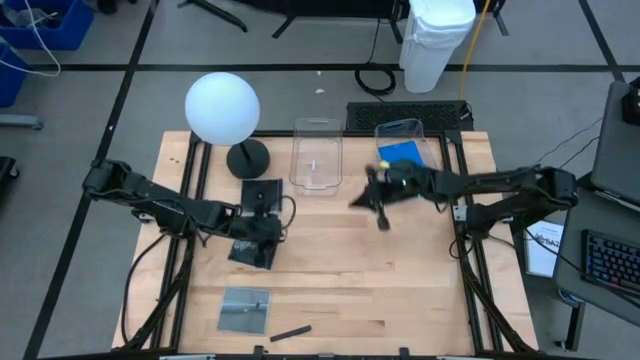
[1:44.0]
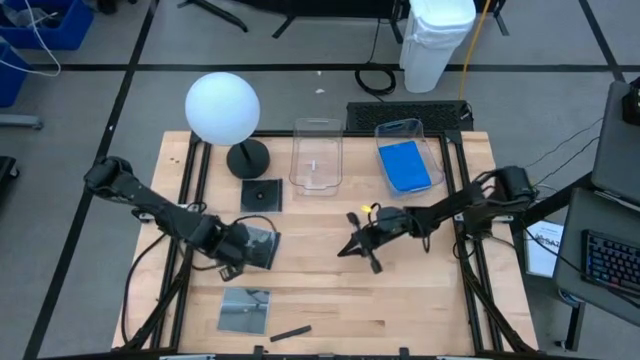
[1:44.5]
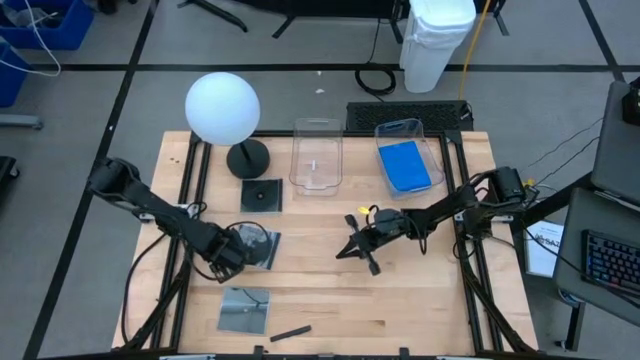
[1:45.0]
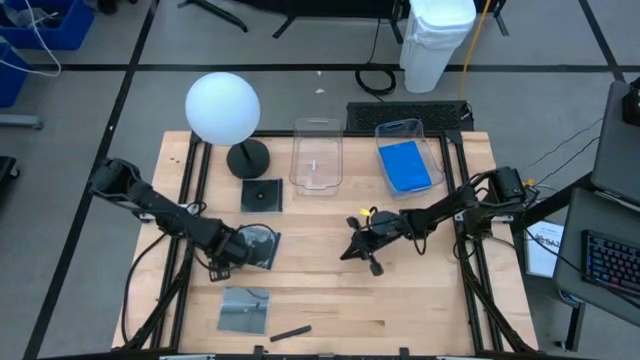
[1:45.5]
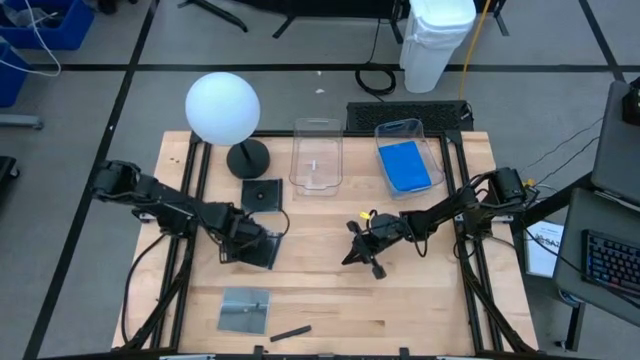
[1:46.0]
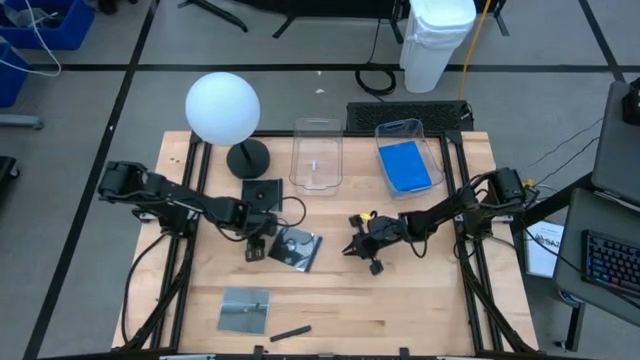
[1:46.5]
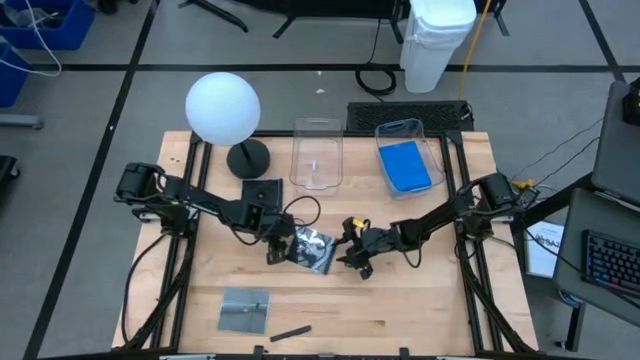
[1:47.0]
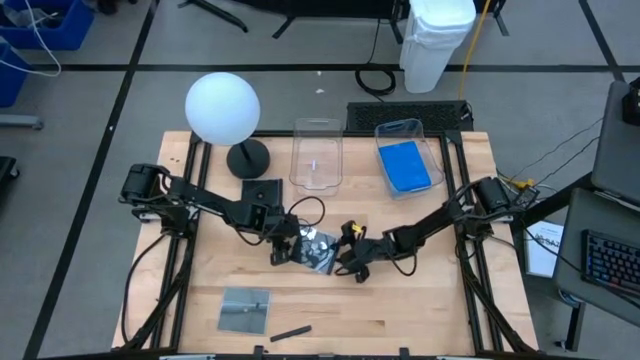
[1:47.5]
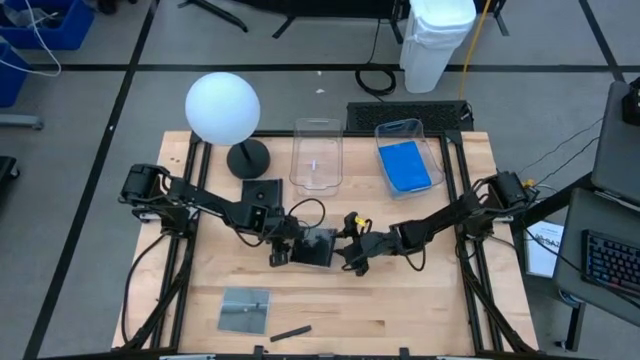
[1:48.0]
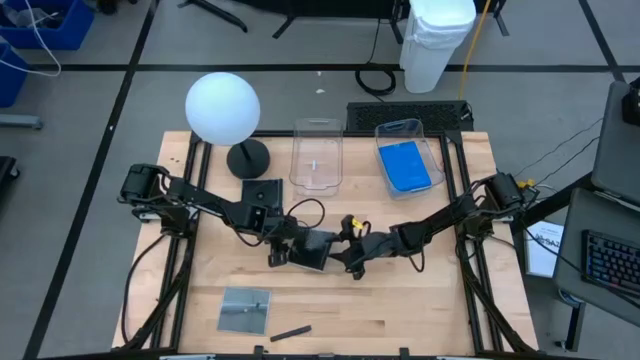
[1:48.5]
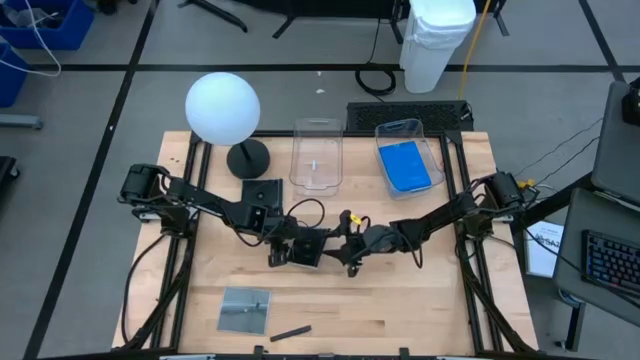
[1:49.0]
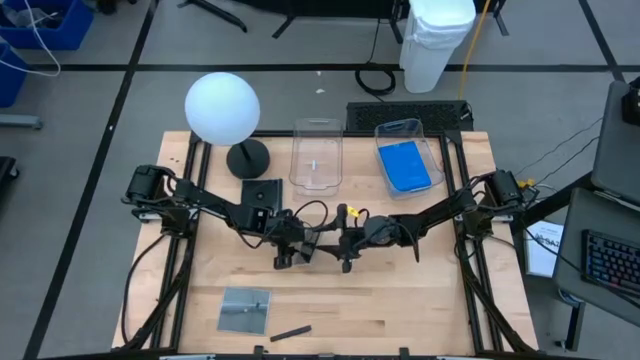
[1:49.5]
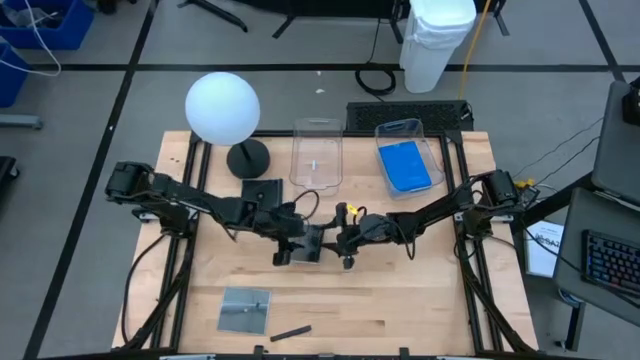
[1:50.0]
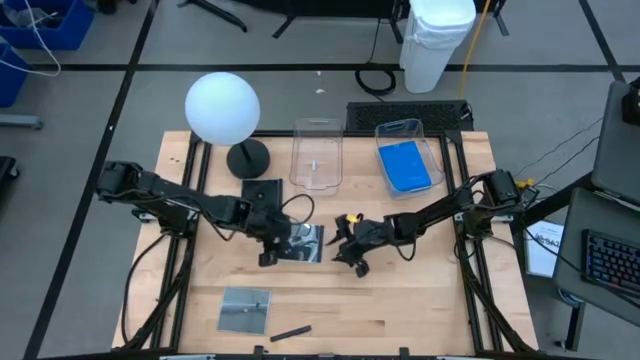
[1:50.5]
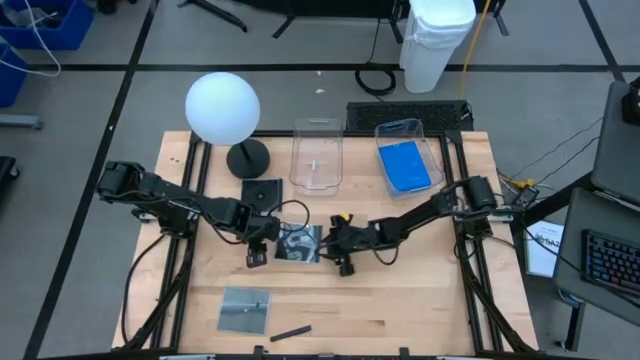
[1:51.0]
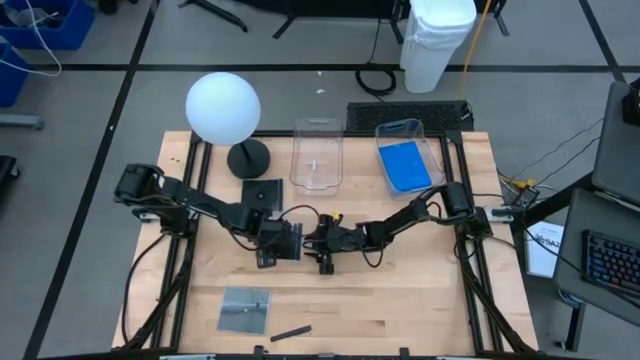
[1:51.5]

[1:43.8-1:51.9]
Task: Pick & place jewel cases by type
Put the middle black CD case into the left transparent bin

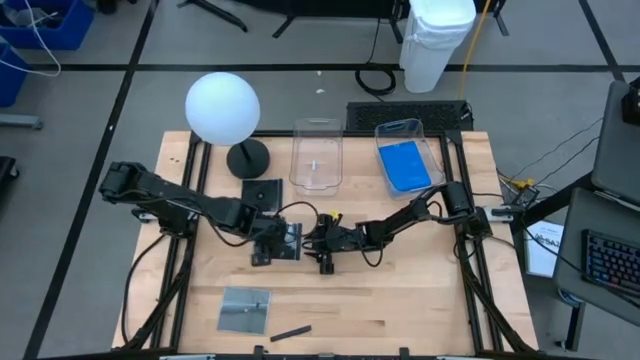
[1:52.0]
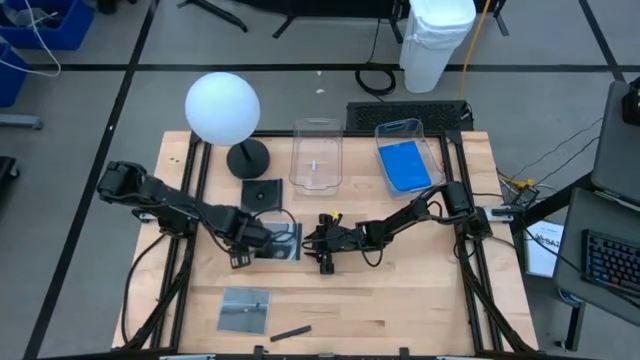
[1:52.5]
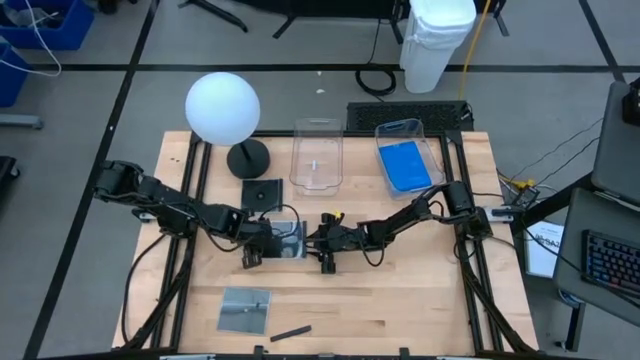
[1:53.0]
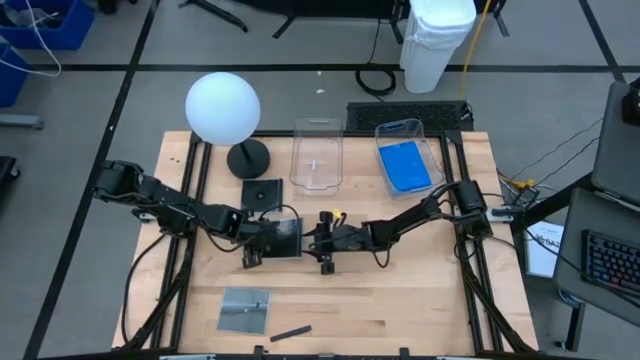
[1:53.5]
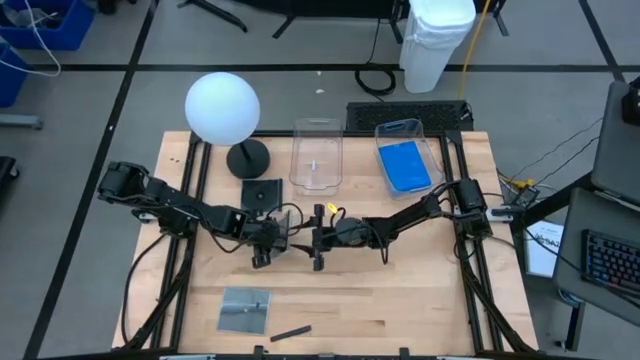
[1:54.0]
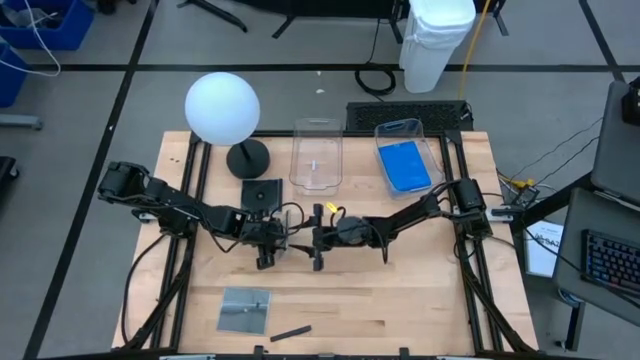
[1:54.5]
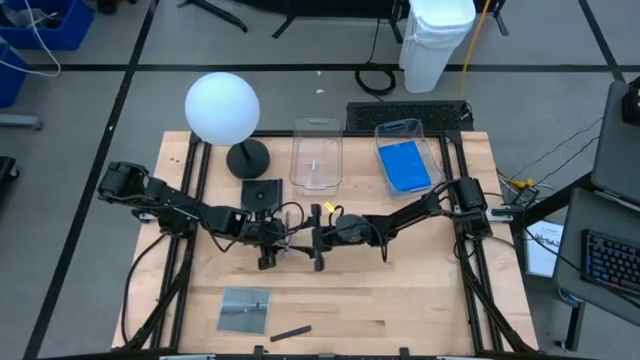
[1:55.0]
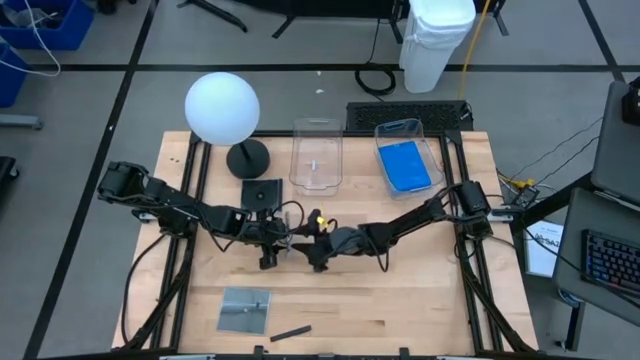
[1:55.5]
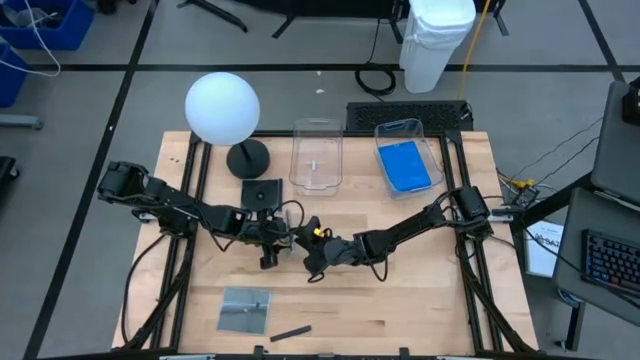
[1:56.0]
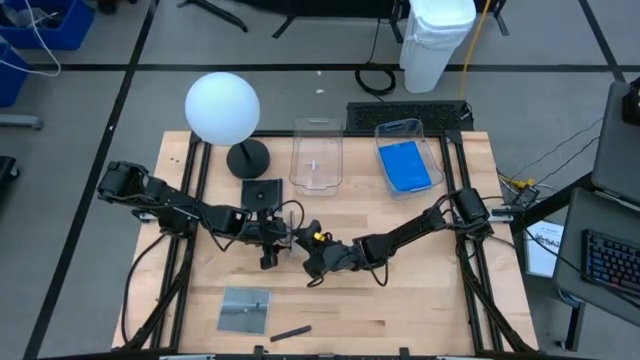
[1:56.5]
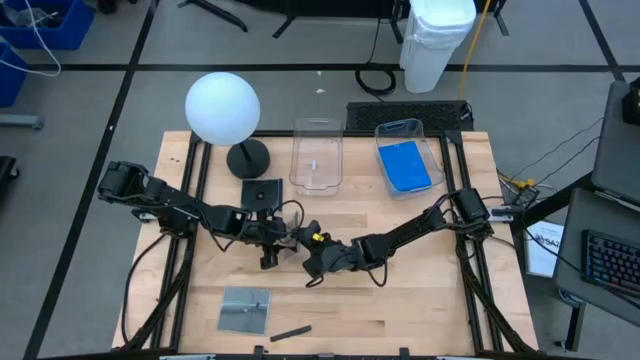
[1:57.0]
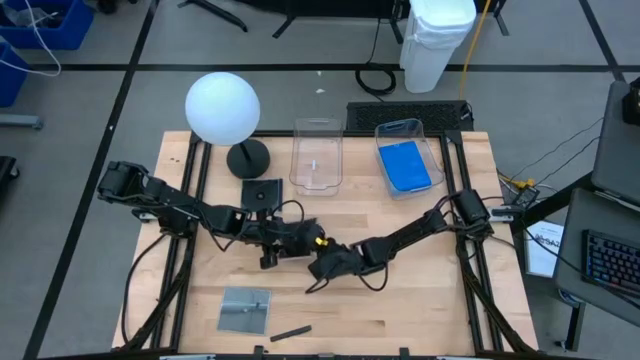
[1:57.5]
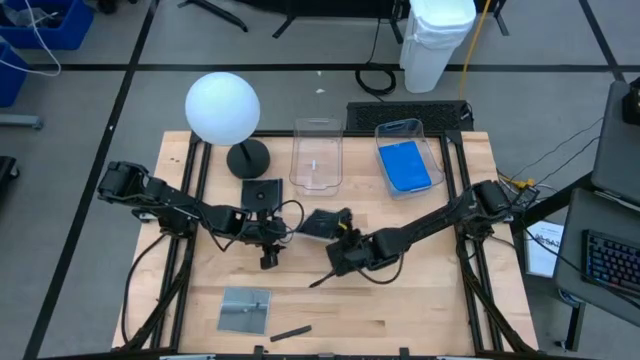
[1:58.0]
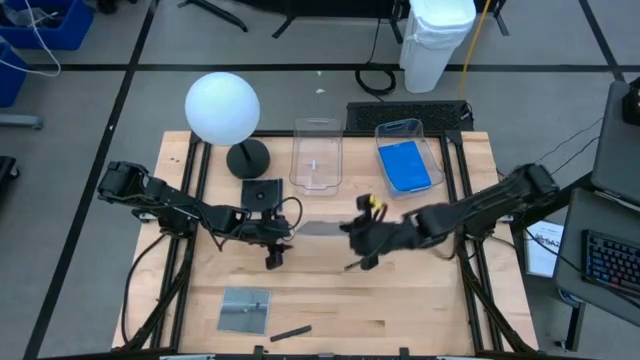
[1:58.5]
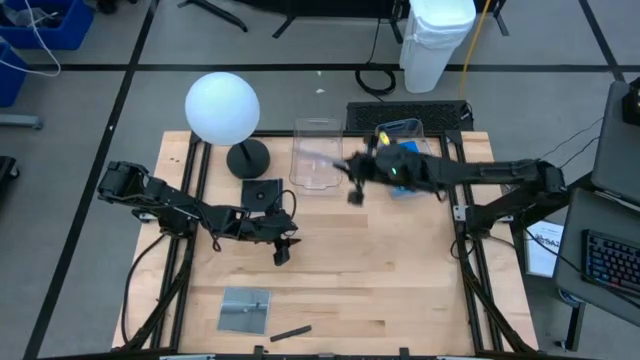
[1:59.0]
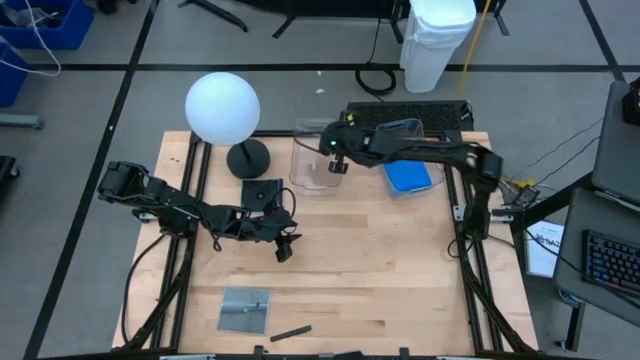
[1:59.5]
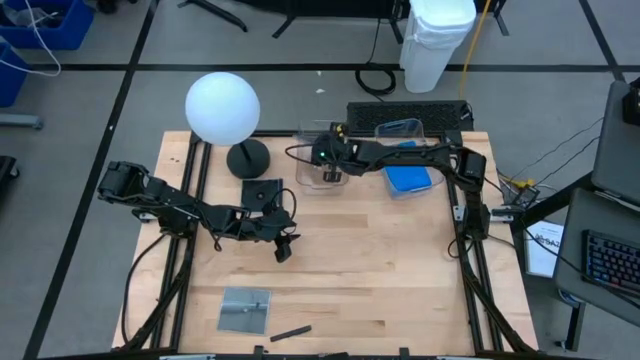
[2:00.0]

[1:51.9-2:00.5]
Put the middle black CD case into the left transparent bin

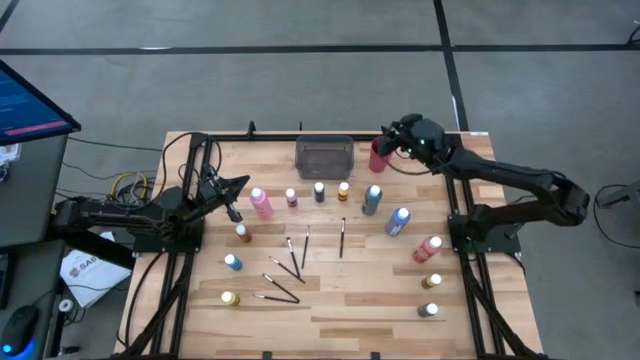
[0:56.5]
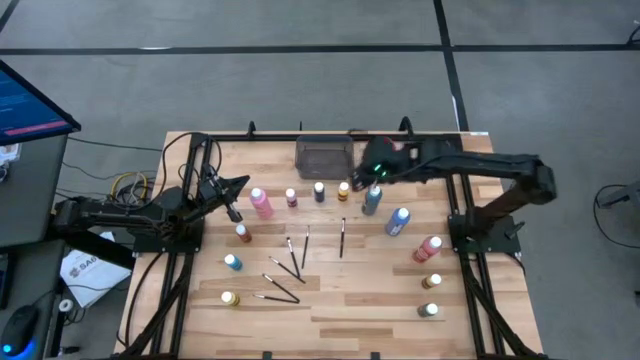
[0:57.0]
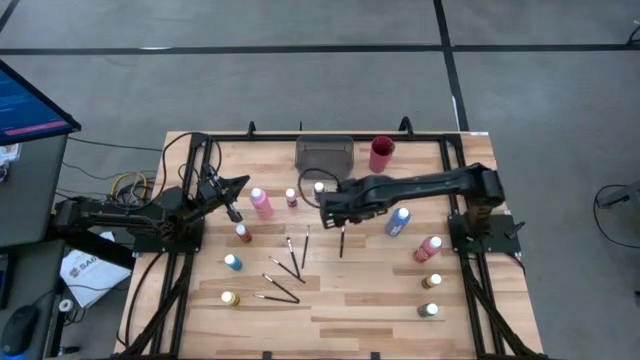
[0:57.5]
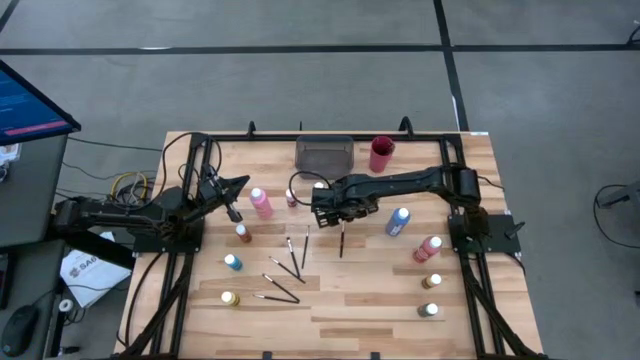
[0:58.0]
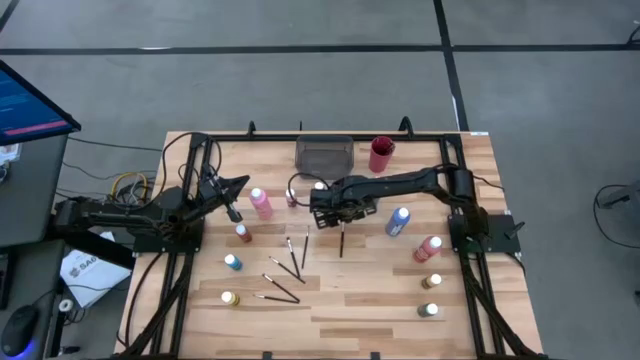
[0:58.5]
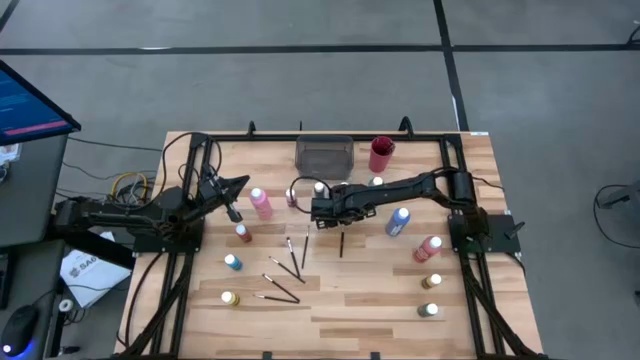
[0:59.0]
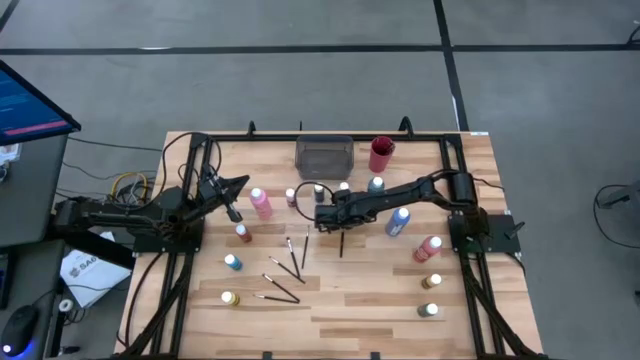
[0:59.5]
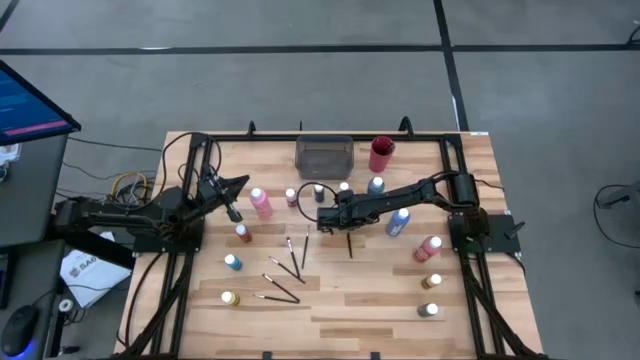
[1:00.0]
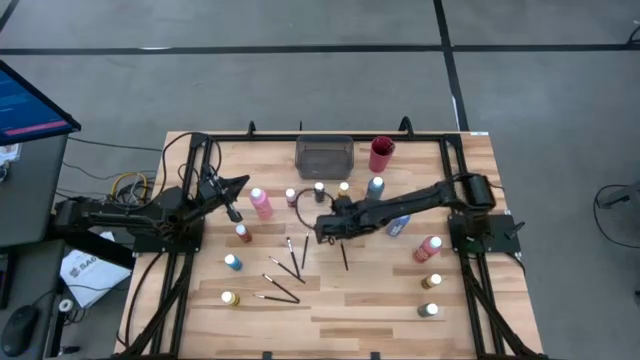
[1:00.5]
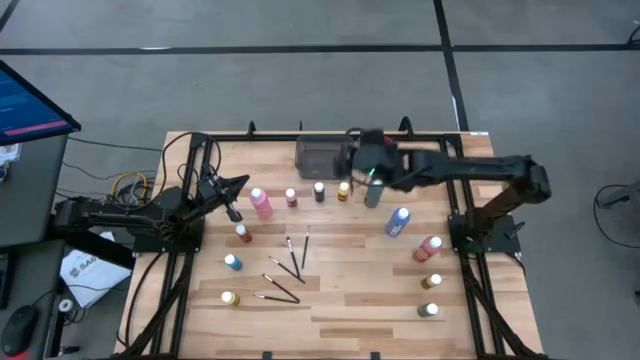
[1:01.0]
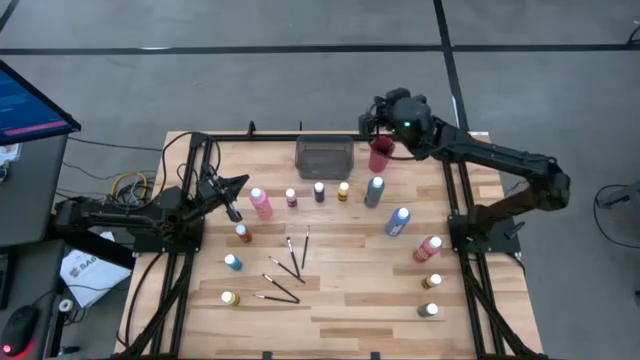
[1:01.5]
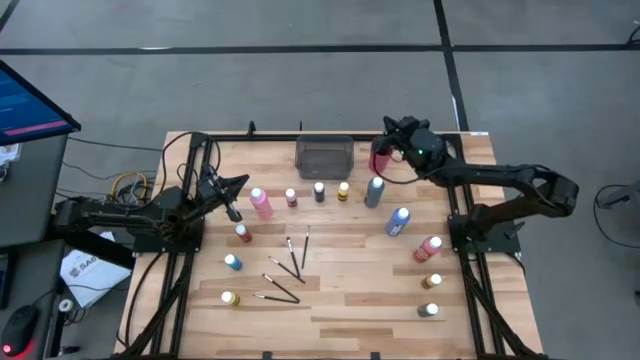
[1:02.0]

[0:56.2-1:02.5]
Task: Pick & Place Paint Supplies
Put the black paintbrush into the red cup
